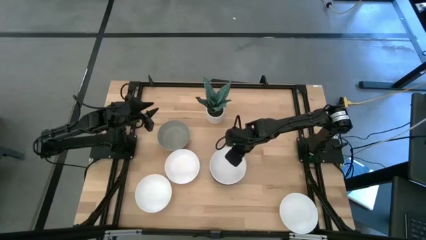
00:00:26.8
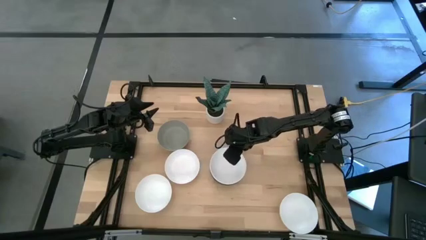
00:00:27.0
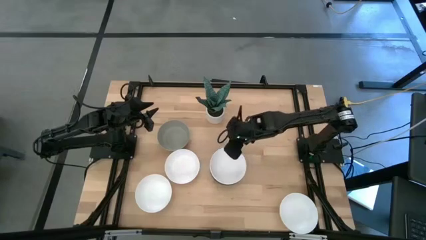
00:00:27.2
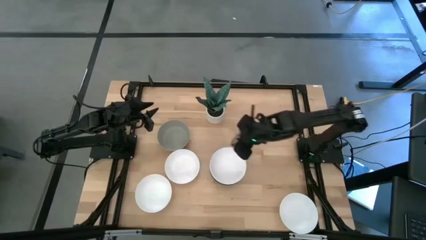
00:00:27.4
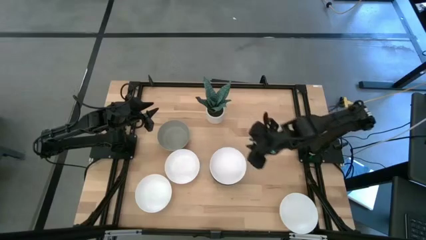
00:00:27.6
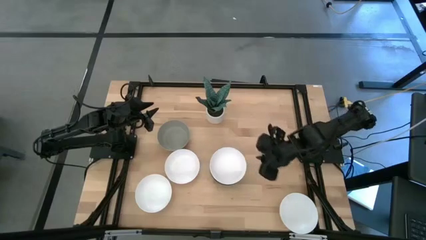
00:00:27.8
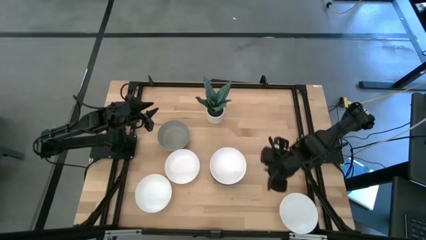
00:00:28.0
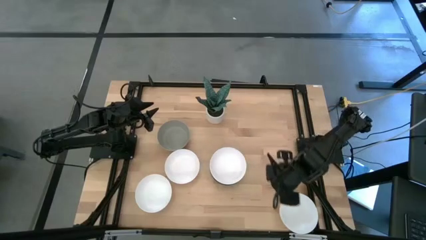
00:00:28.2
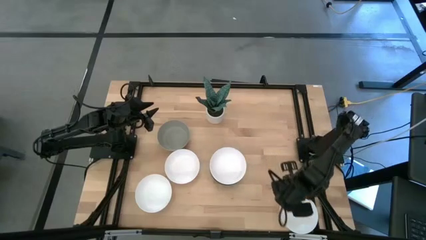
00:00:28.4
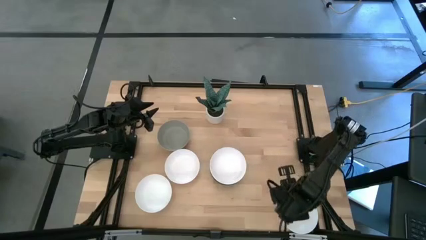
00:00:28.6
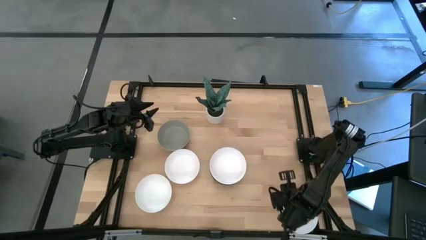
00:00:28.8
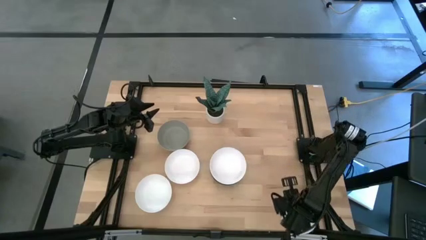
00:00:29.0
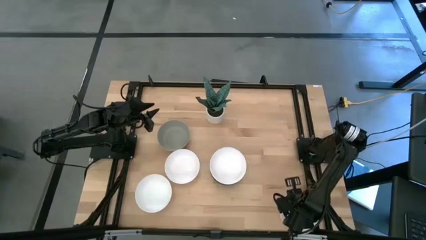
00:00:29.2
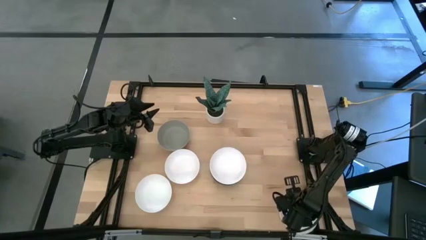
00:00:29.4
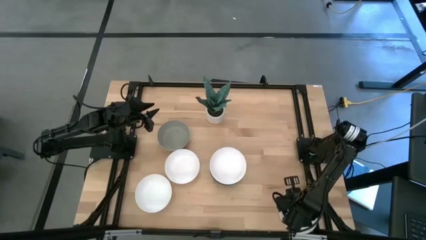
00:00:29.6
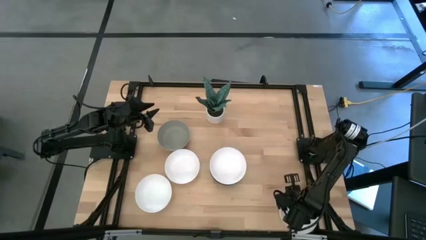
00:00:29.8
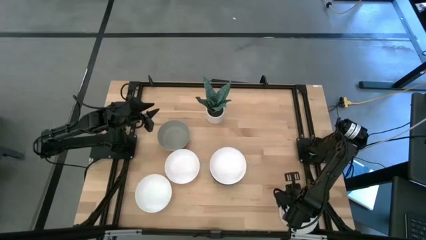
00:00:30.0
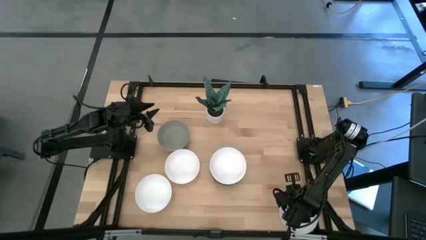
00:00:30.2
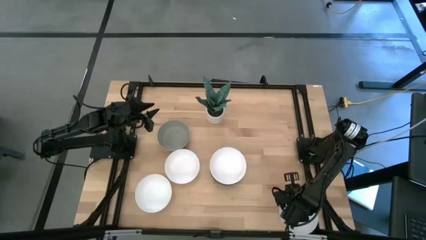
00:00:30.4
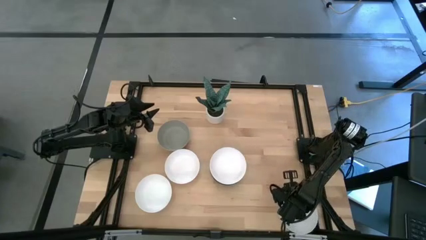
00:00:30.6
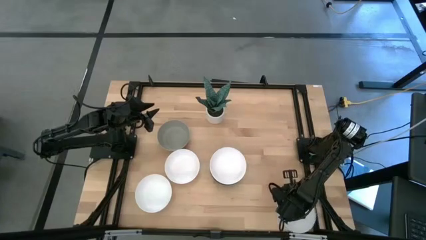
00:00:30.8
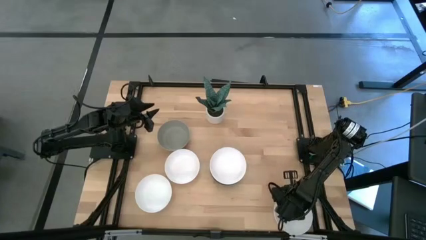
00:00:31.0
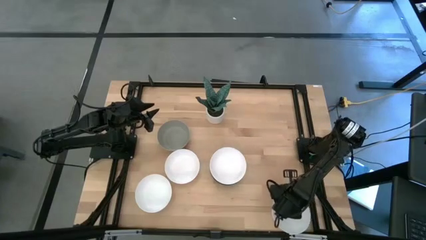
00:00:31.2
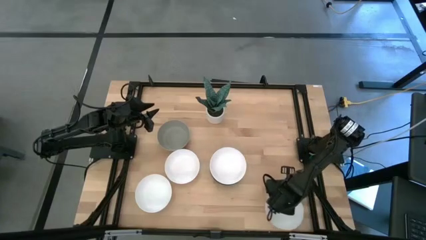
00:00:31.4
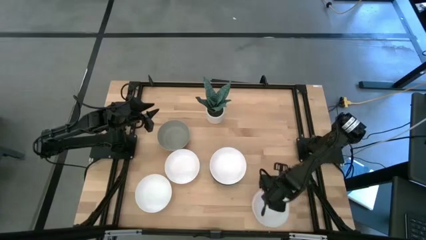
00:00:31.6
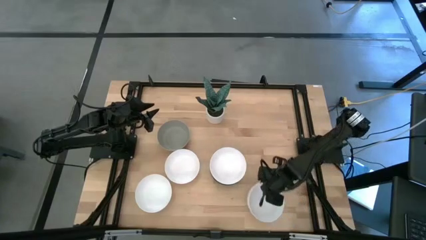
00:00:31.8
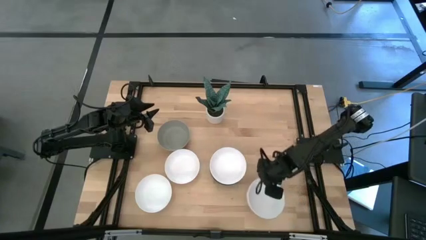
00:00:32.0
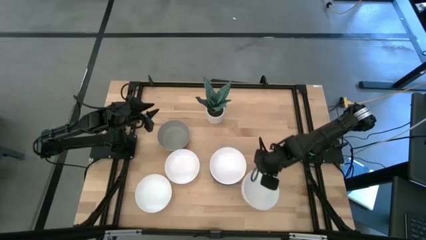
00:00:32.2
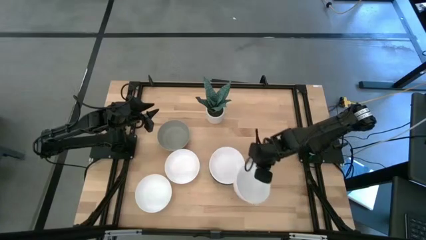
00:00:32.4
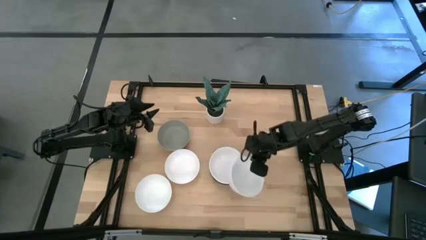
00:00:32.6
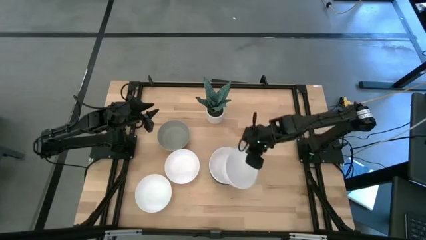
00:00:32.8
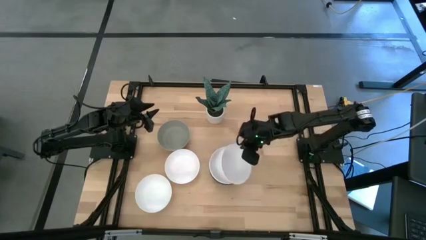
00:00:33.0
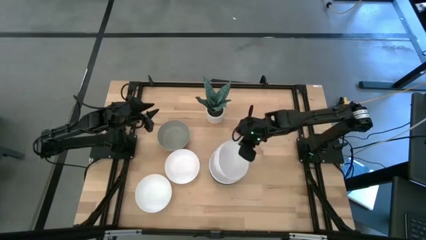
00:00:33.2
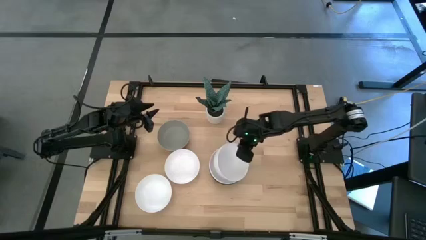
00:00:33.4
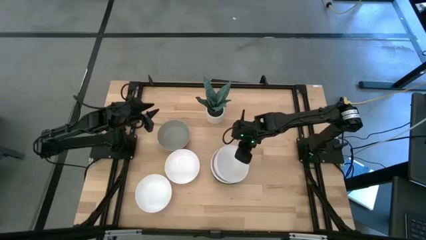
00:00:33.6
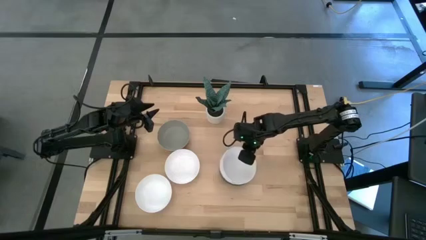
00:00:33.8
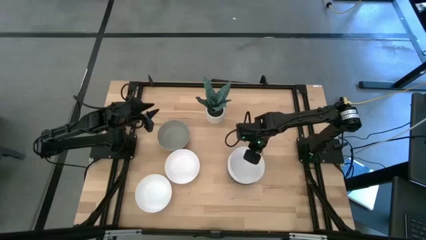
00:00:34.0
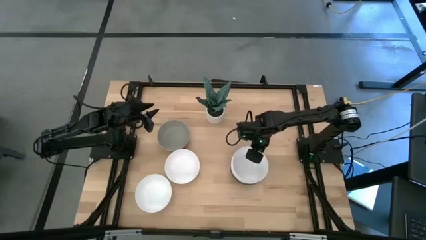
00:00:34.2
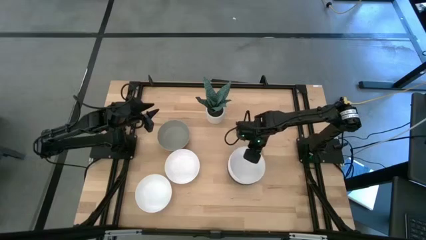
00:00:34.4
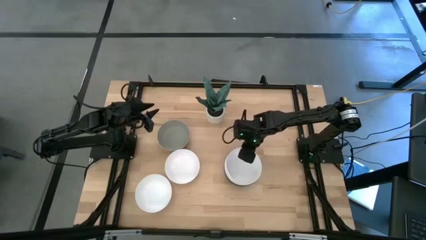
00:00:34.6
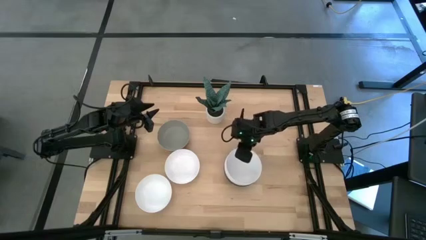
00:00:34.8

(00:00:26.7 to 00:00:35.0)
Task: Nest bowls inside each other
Stack the white bowl on the other white bowl

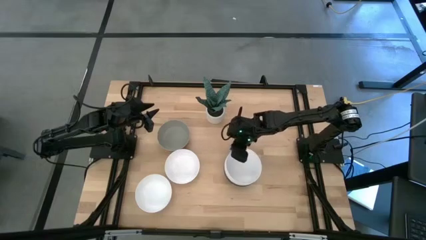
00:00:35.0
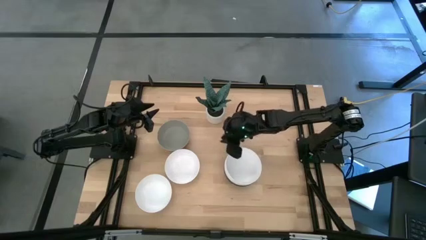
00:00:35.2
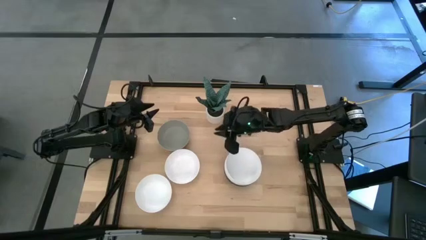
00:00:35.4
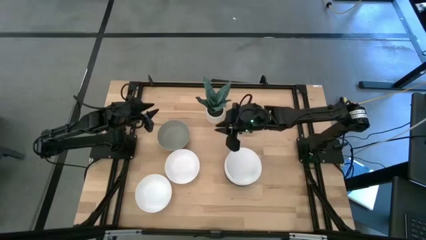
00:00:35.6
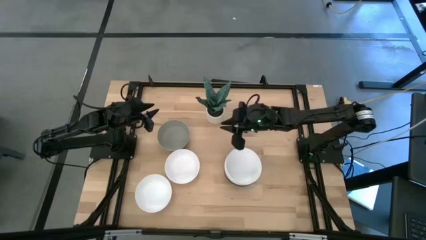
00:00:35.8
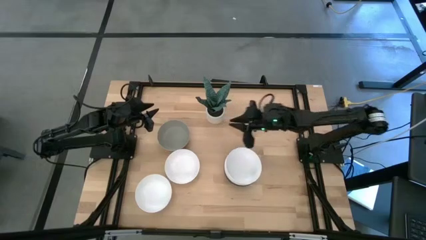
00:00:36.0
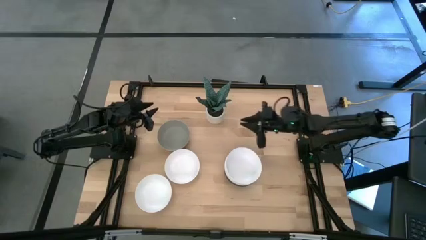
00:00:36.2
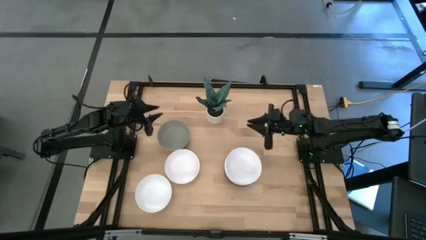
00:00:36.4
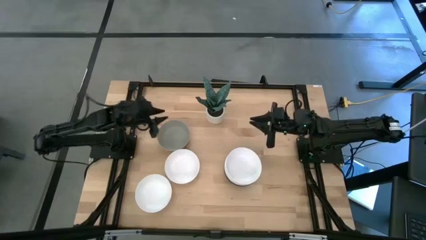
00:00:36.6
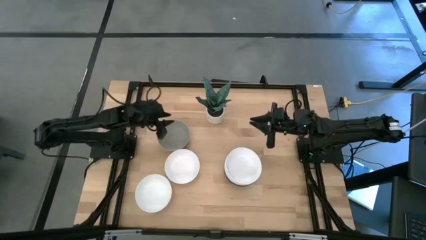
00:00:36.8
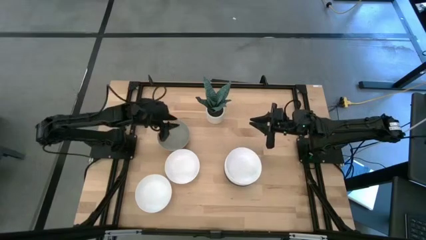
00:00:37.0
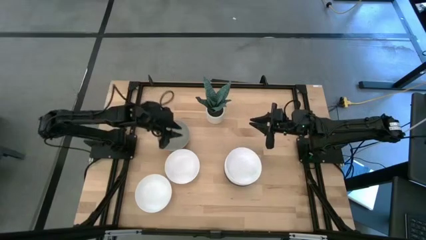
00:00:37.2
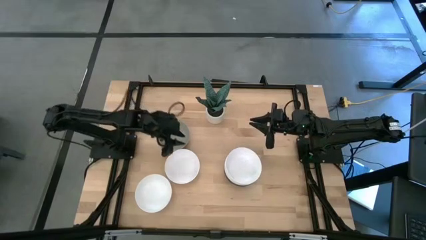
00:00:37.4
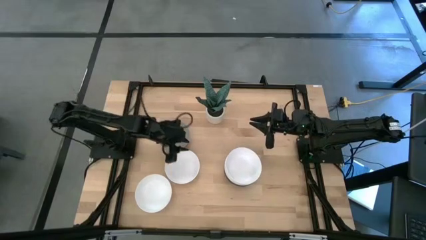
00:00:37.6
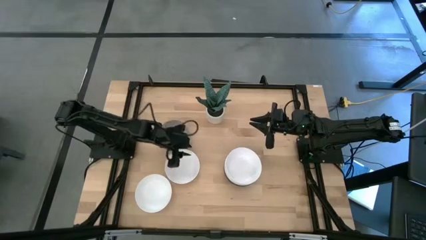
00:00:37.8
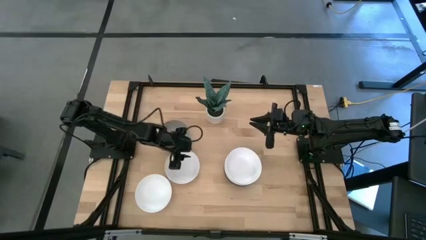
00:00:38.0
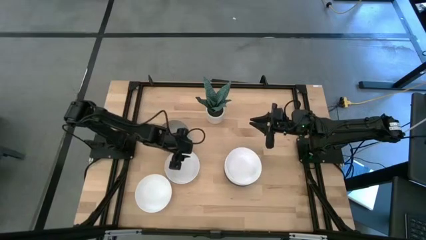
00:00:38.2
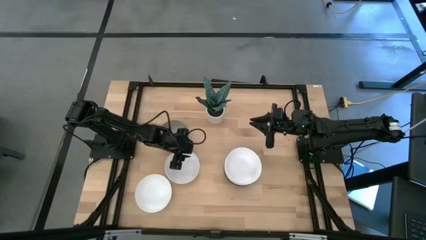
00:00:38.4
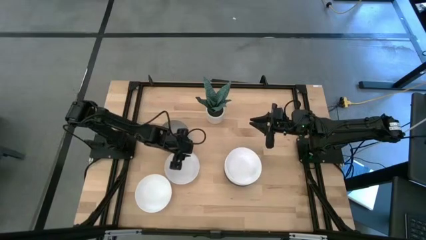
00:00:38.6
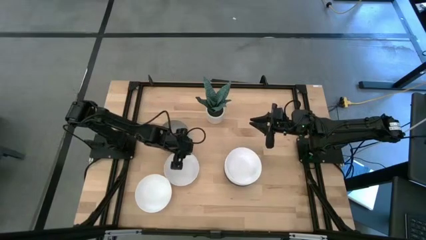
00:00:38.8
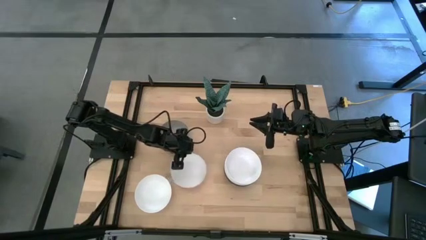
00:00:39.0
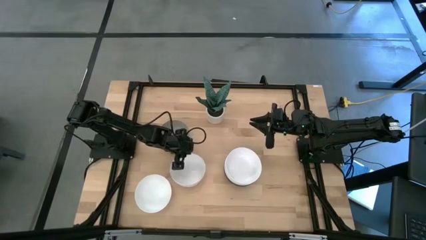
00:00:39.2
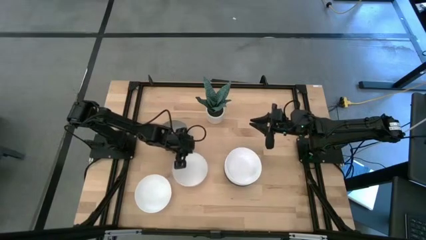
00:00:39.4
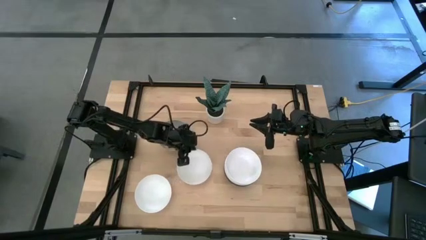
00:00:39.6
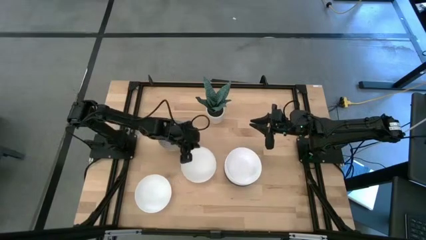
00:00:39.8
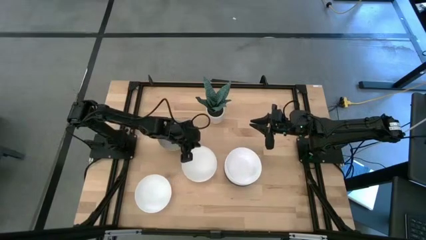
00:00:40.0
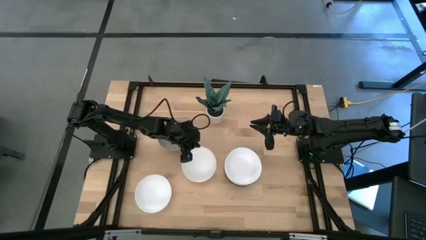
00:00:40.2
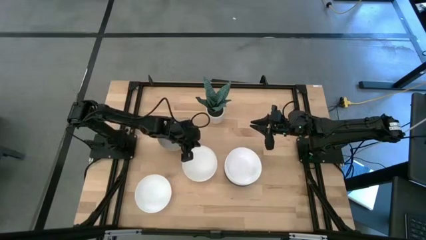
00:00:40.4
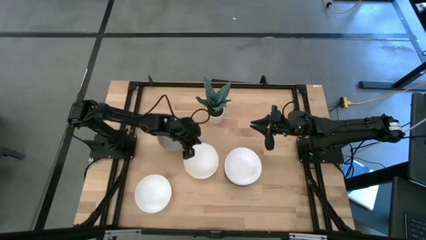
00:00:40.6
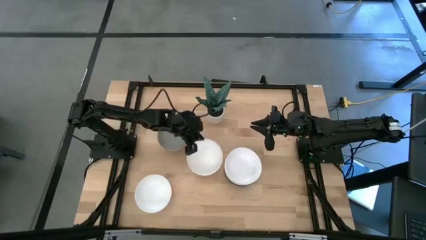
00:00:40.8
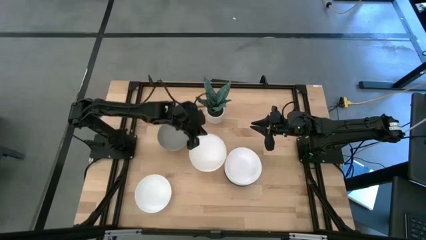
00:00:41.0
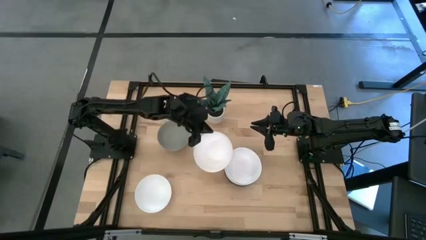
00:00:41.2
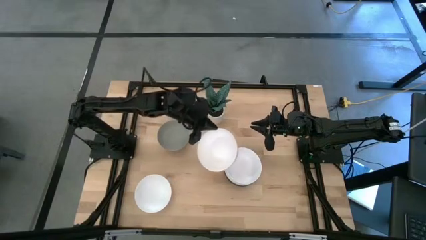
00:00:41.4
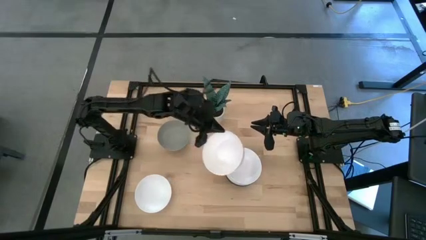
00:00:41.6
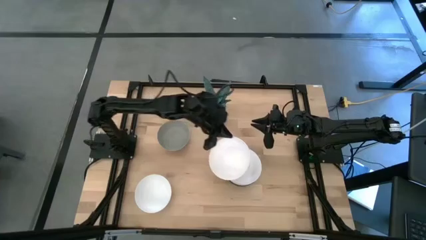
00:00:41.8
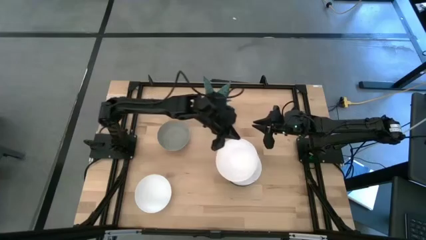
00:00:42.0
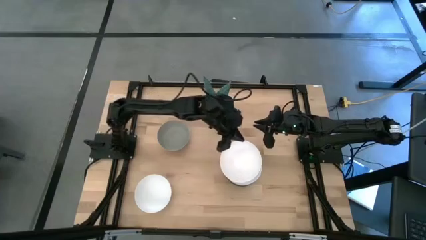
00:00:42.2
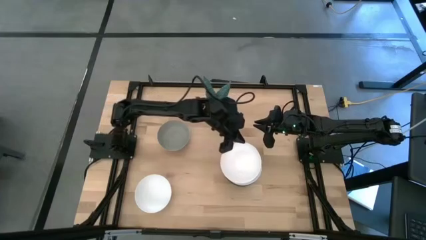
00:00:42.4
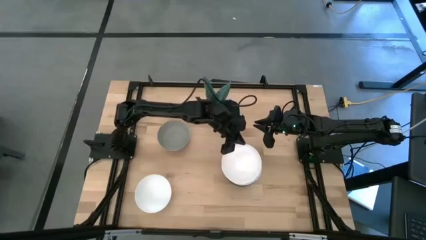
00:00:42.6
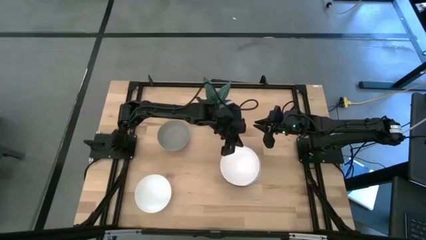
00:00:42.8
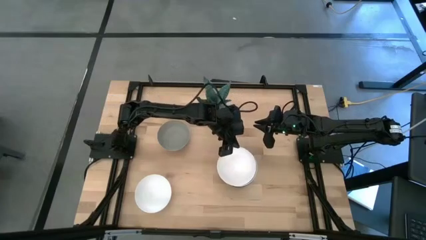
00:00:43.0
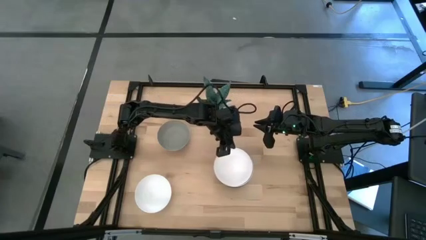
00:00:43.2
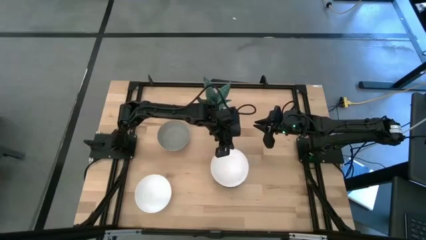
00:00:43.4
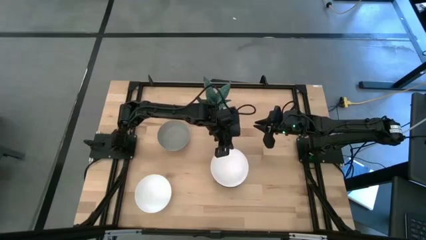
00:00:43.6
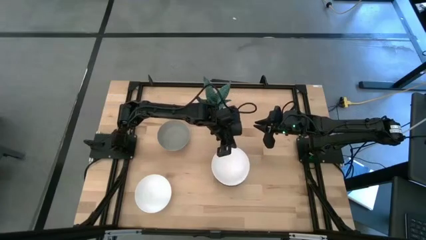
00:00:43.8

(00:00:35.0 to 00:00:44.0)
Stack the white bowl on the other white bowl

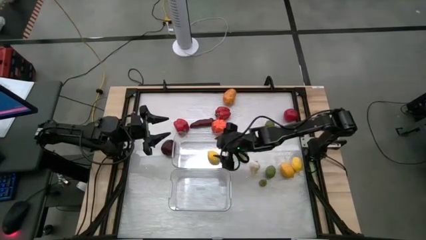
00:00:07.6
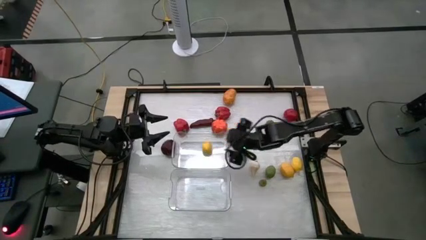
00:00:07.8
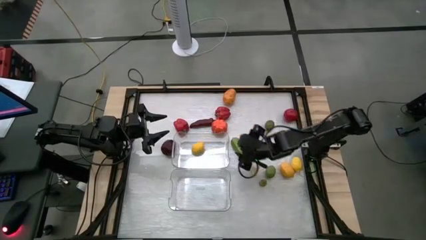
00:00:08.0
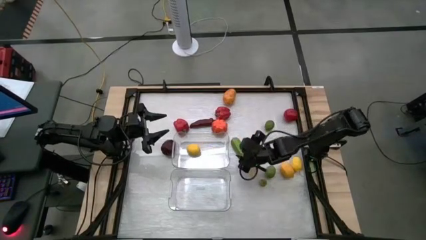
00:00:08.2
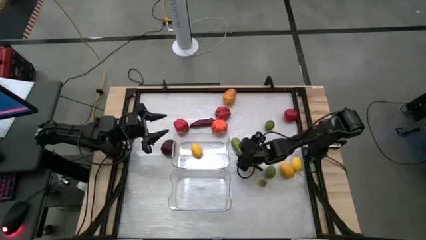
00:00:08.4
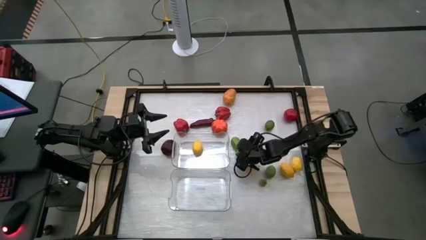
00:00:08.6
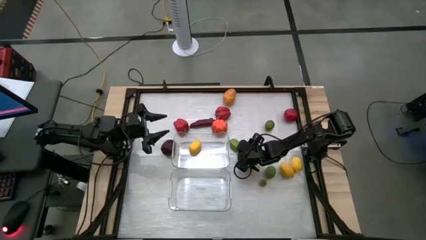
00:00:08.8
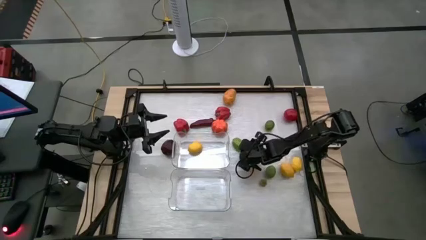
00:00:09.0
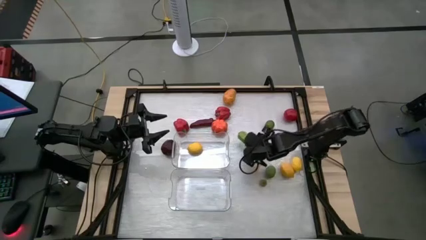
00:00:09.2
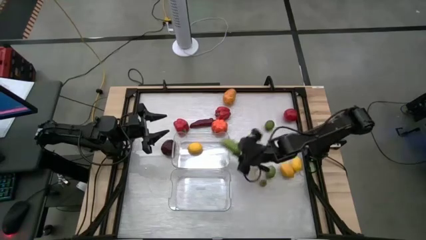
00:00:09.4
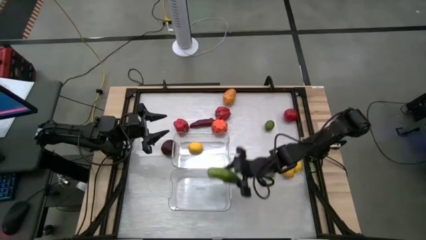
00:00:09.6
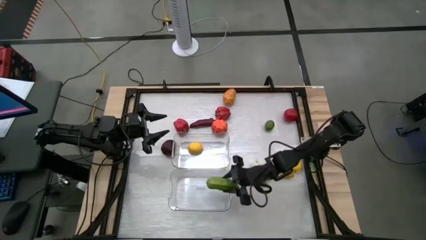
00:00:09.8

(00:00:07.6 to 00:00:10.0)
Task: Sort produce into baskets
Put the cucumber into the bottom transparent bin
